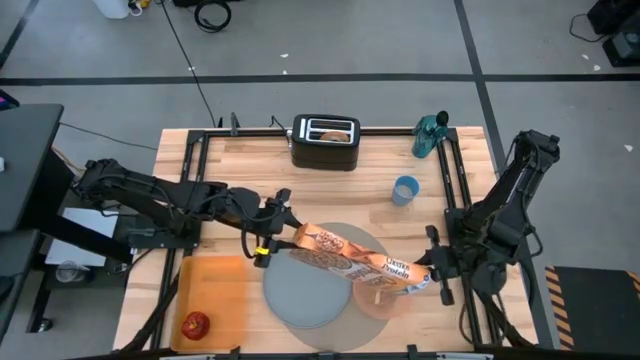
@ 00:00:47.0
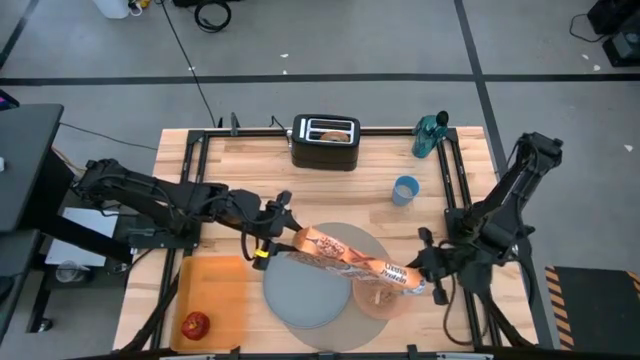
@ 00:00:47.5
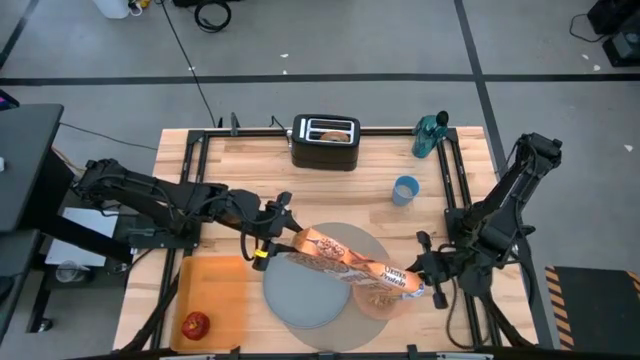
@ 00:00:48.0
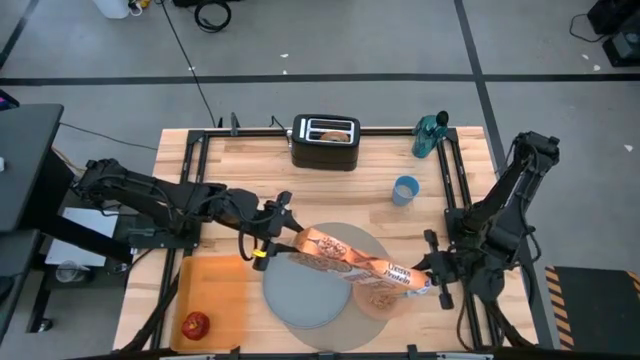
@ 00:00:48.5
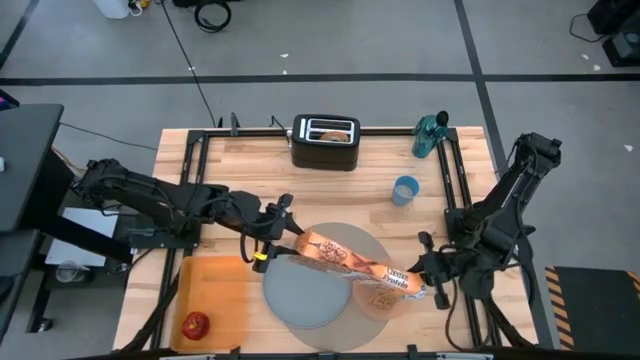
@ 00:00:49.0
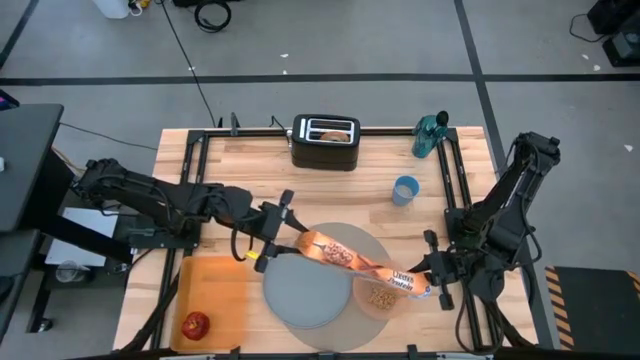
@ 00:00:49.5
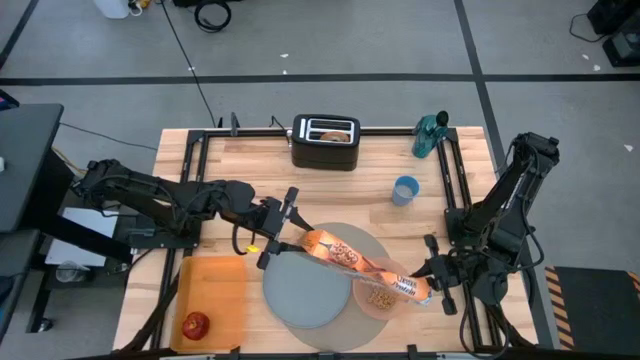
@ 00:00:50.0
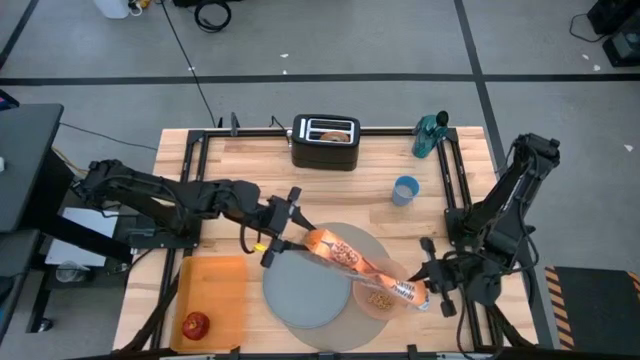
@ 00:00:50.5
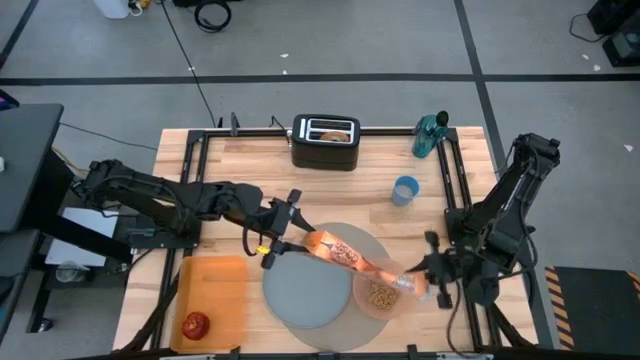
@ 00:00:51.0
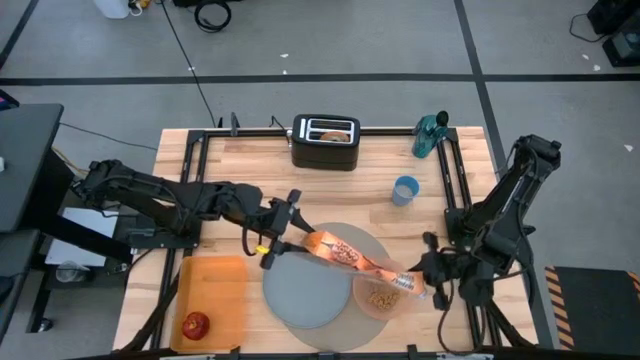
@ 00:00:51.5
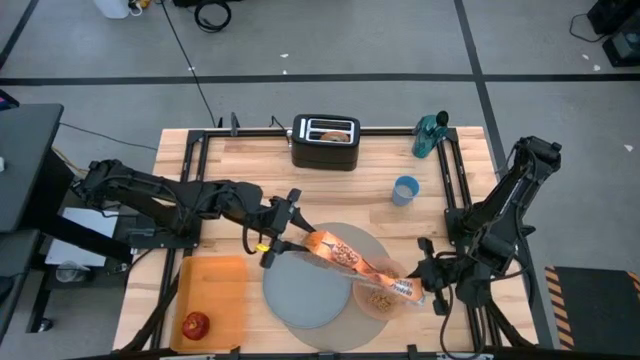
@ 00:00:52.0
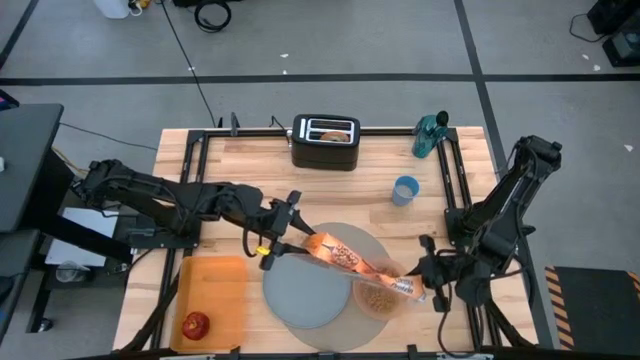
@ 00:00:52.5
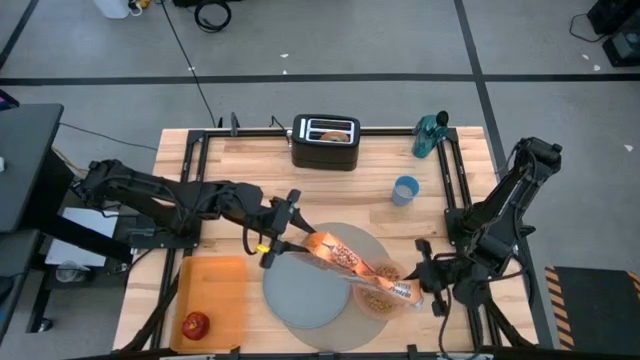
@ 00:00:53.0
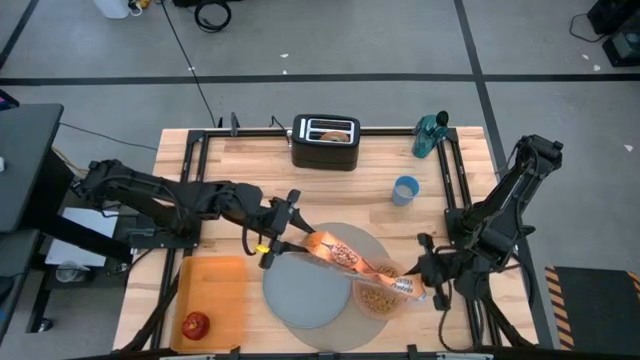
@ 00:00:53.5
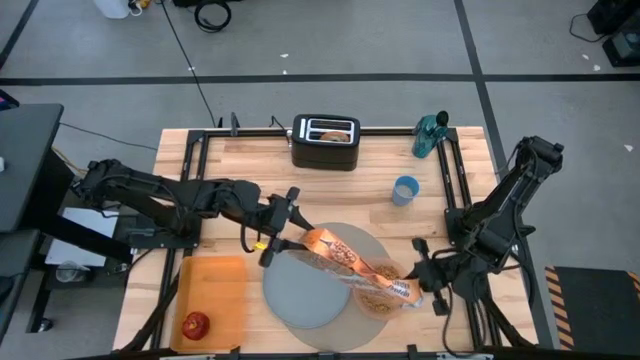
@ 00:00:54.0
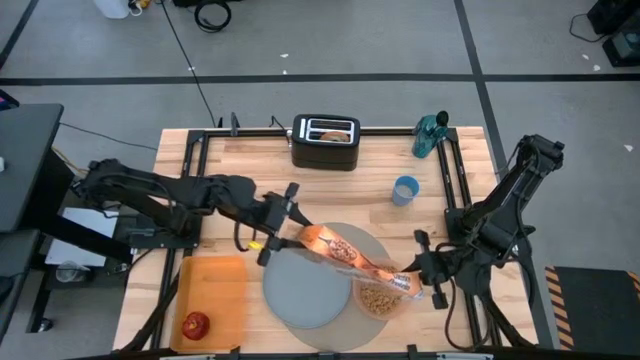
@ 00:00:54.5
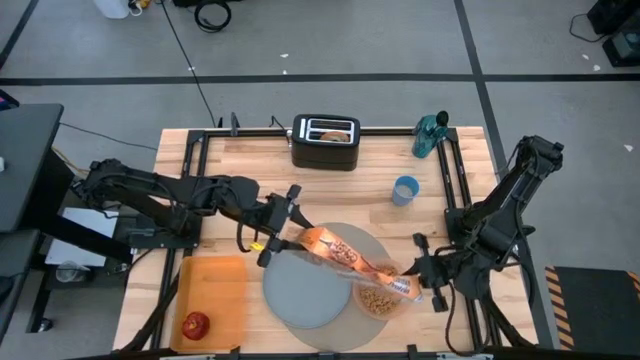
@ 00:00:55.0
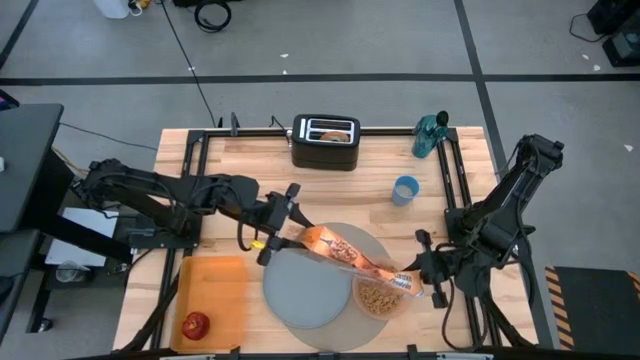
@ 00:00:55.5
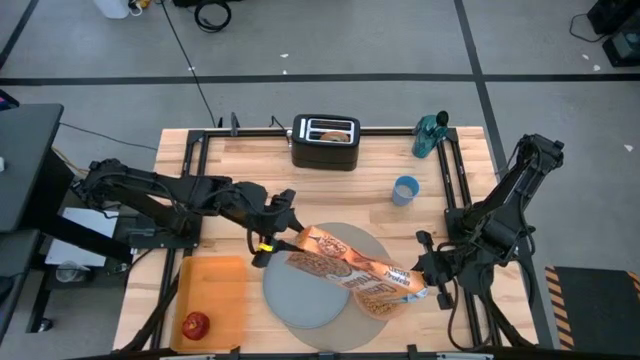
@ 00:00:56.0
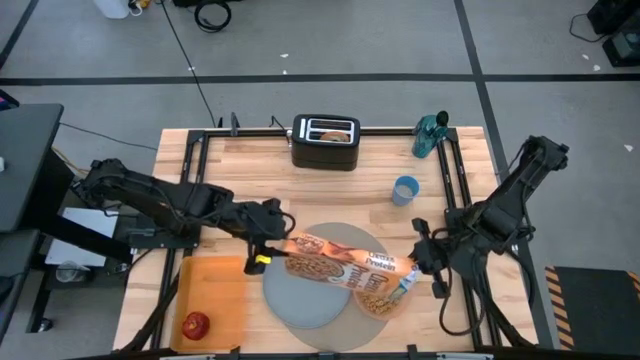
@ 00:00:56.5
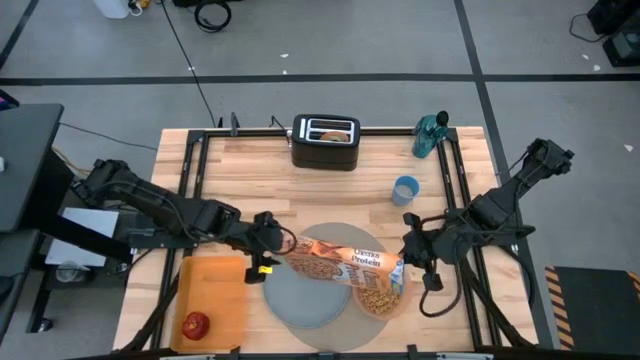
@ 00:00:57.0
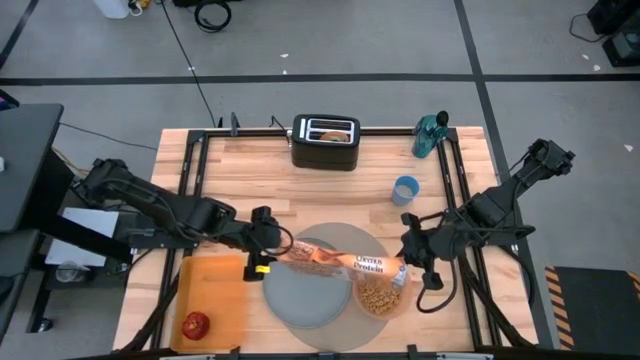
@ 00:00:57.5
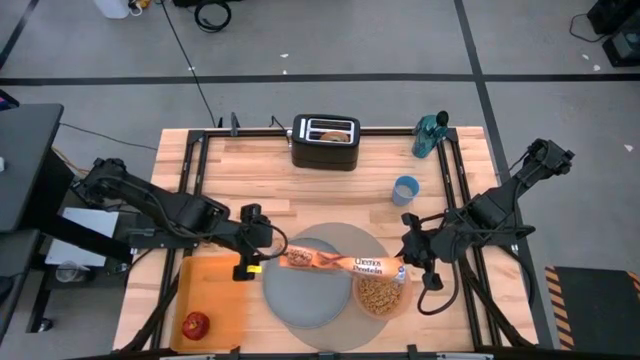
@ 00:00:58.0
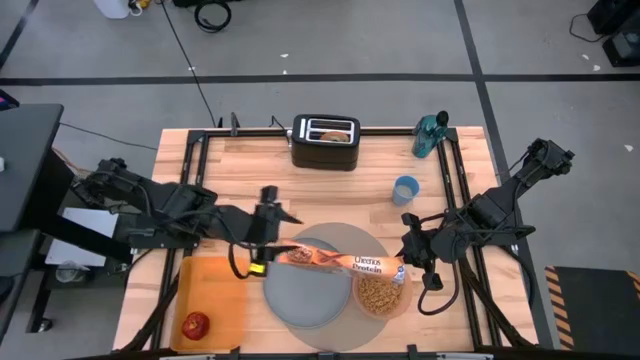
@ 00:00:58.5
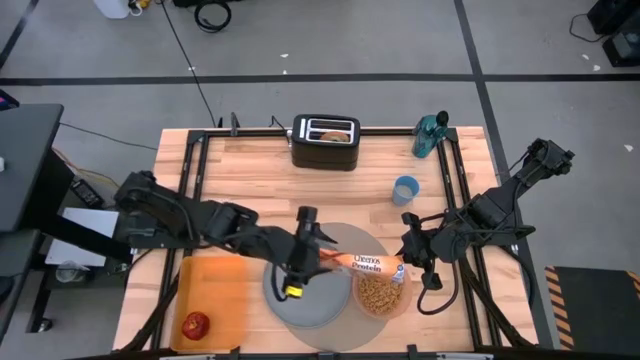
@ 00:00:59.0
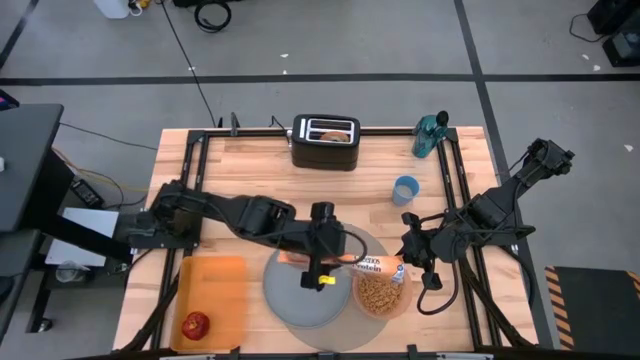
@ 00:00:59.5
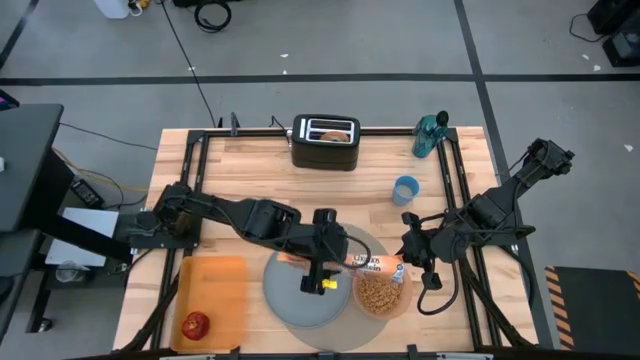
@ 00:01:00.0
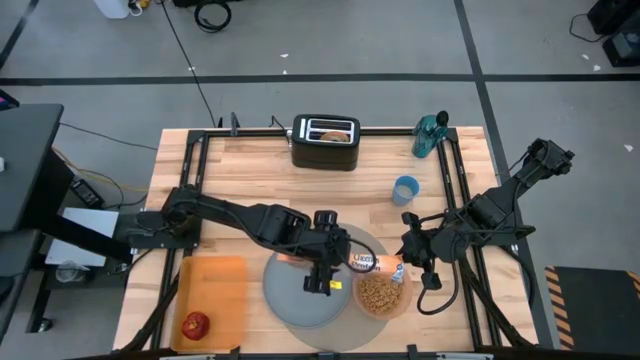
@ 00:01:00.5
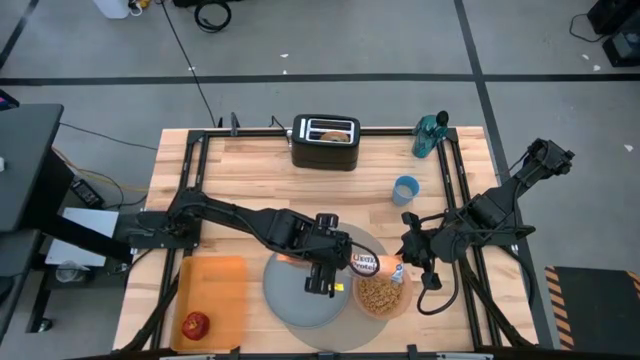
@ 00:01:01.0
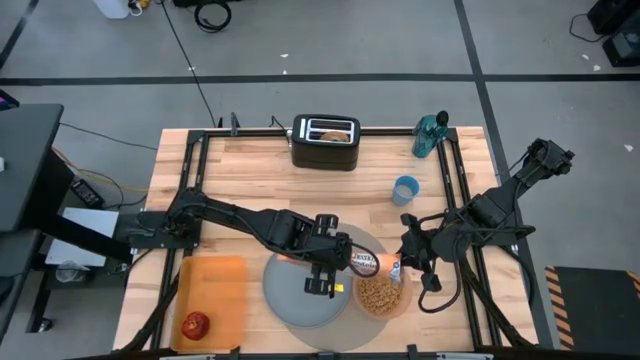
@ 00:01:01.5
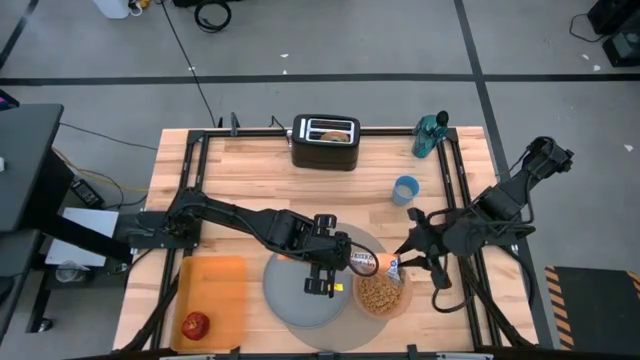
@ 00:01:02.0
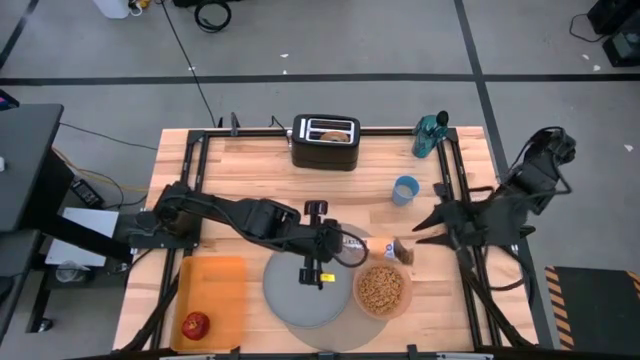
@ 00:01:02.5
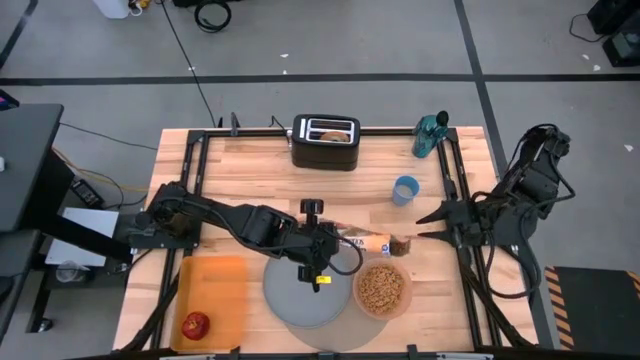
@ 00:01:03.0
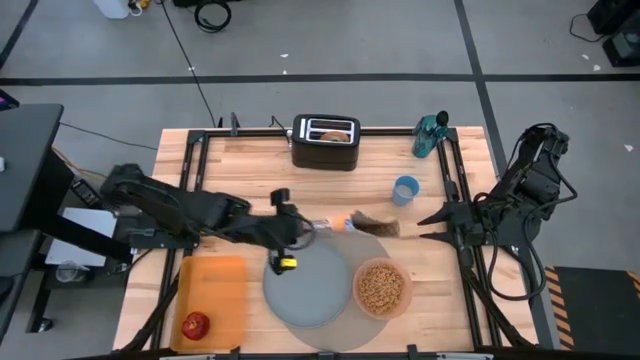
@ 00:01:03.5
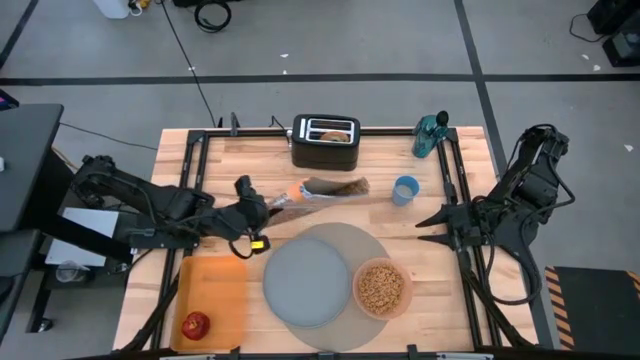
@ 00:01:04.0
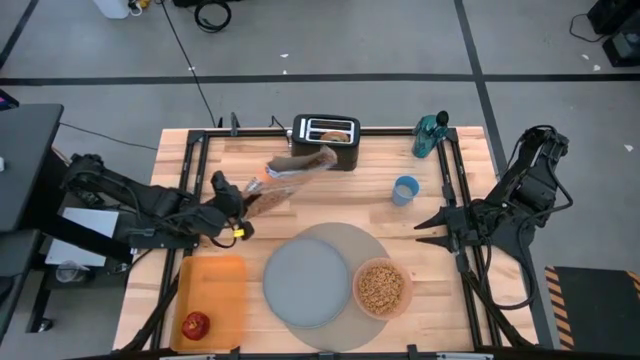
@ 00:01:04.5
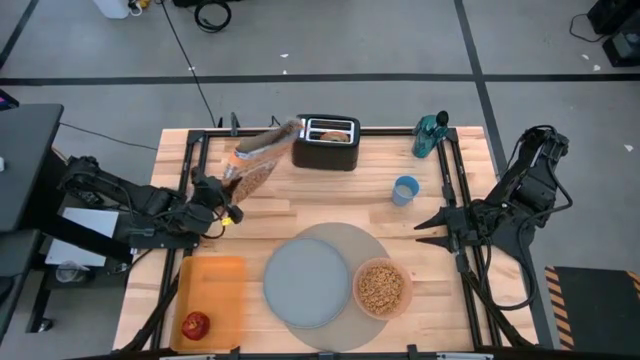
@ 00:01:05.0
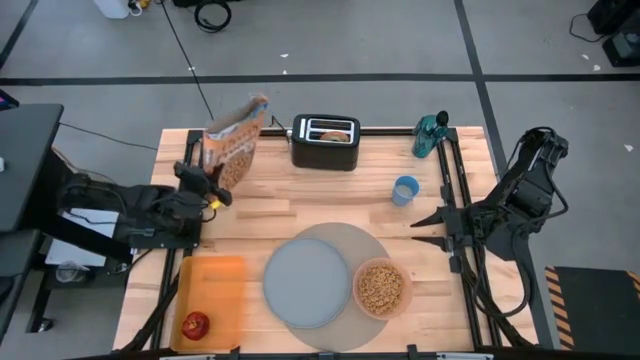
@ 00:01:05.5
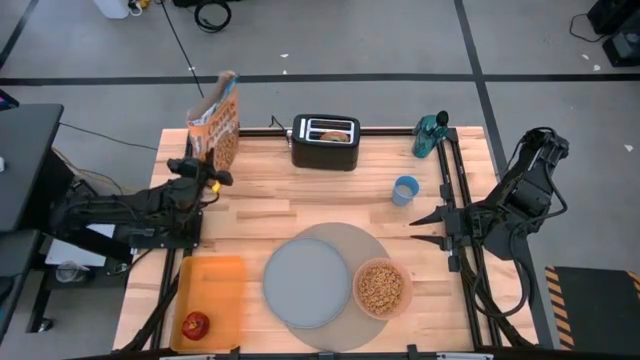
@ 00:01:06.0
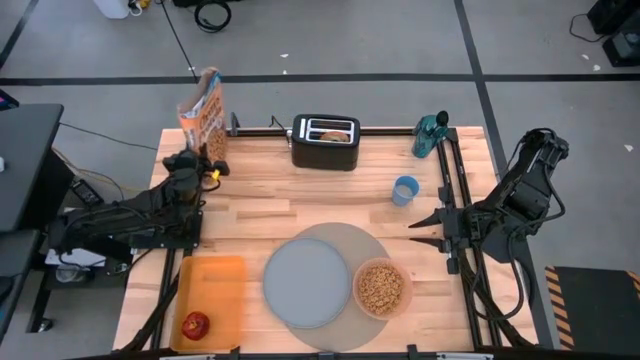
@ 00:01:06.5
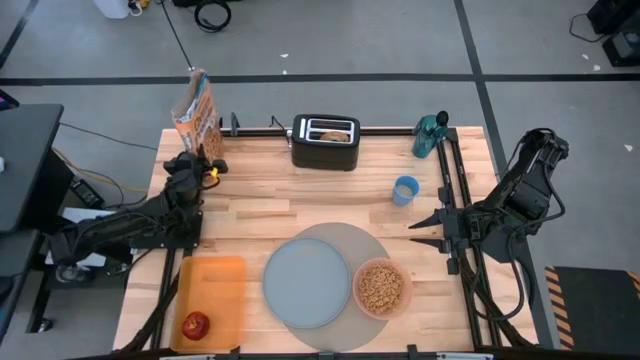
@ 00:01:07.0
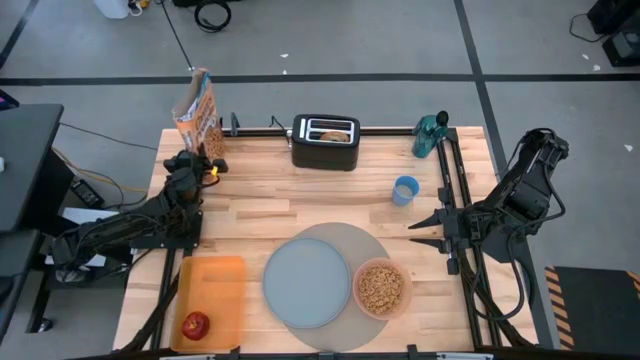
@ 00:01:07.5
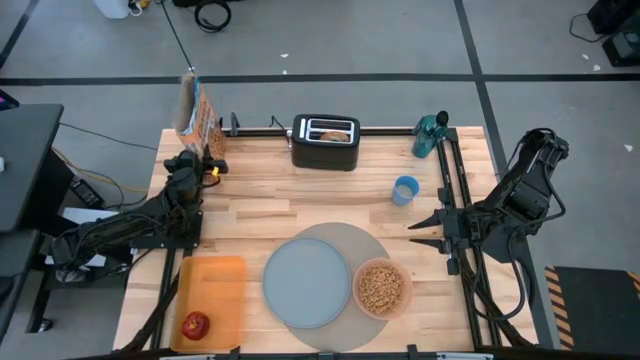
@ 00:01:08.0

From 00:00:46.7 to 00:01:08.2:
Task: Arrange a breakfast setting
Put cereal into the pink bowl
